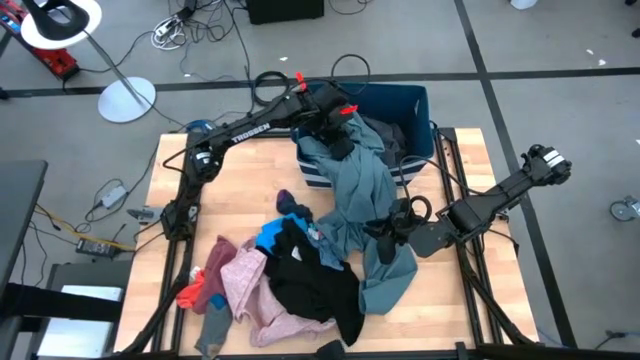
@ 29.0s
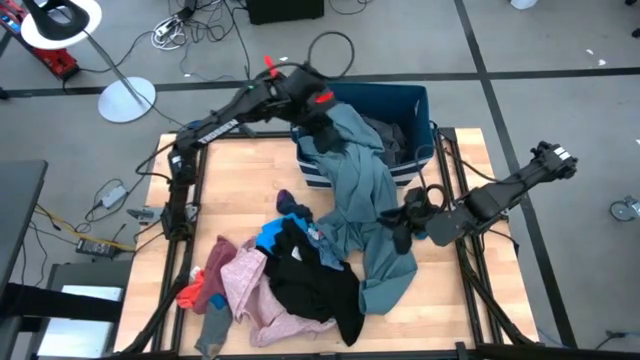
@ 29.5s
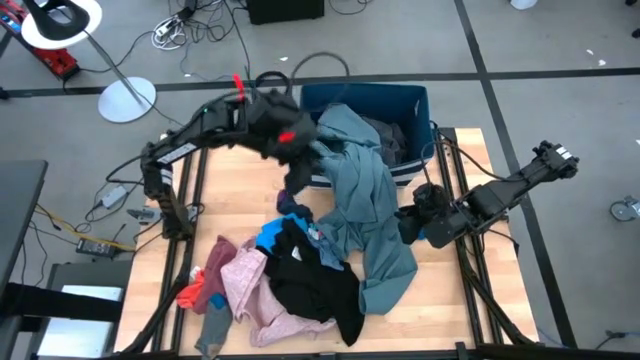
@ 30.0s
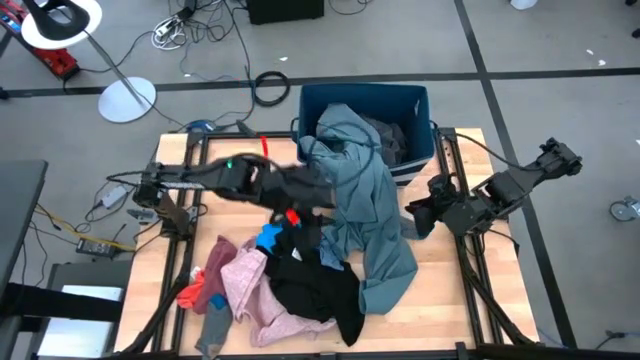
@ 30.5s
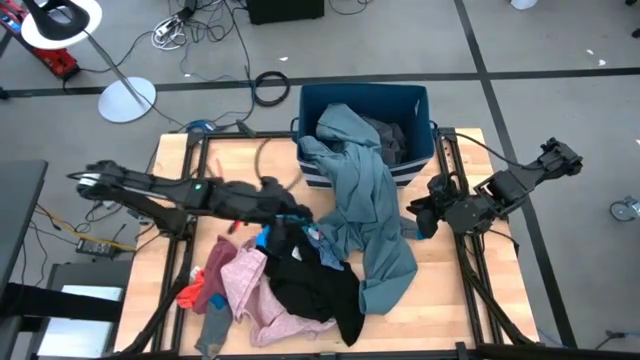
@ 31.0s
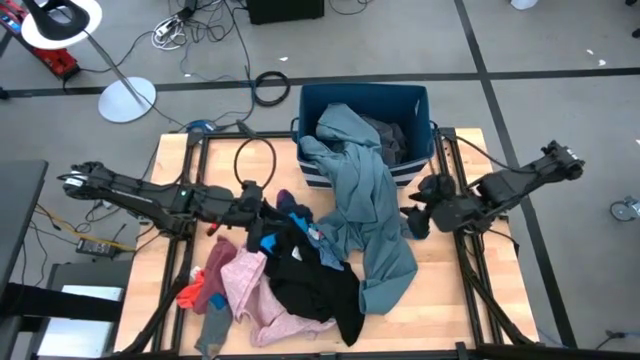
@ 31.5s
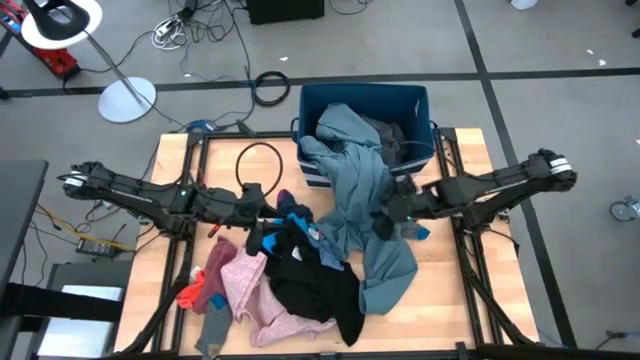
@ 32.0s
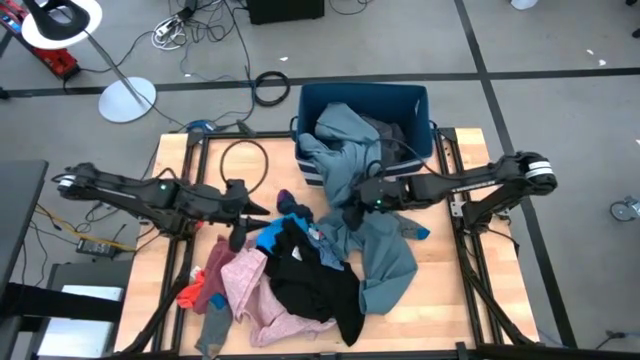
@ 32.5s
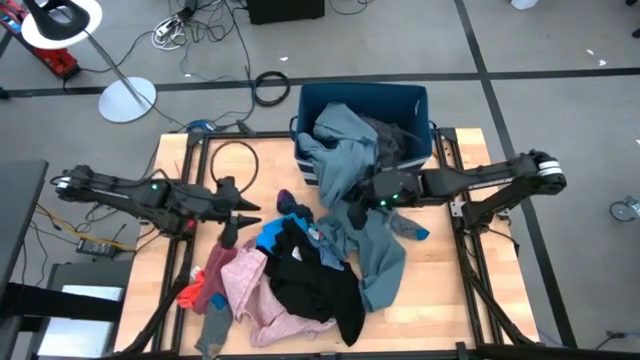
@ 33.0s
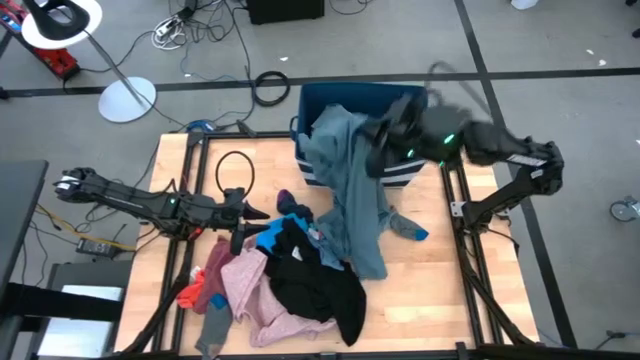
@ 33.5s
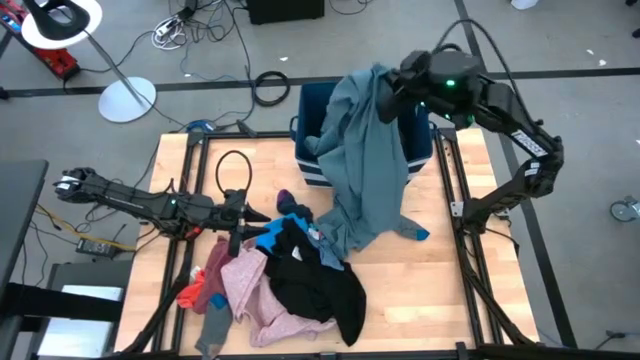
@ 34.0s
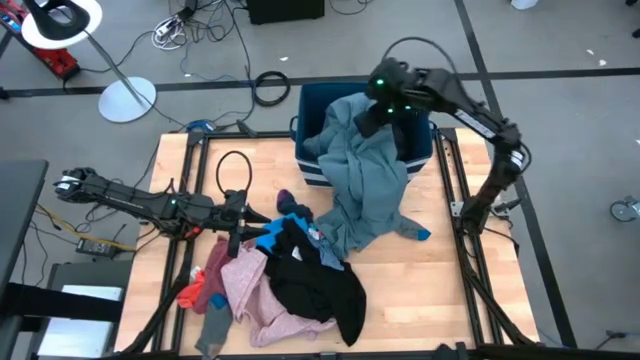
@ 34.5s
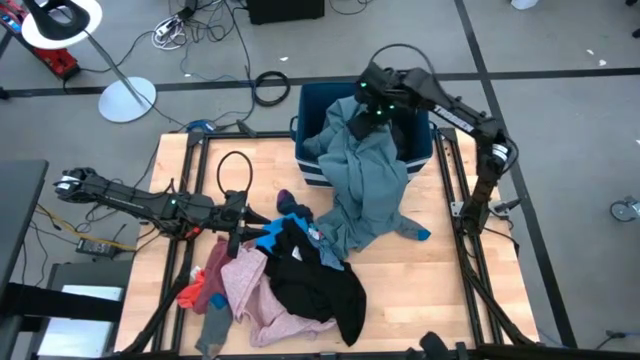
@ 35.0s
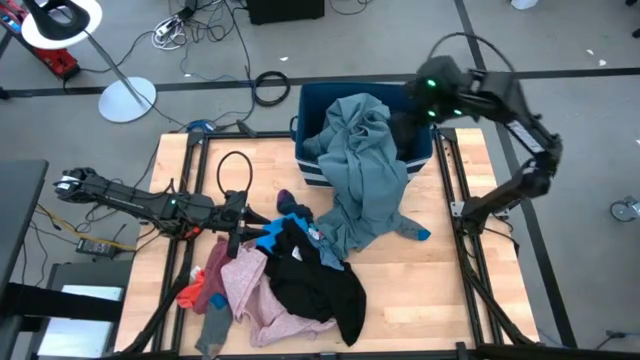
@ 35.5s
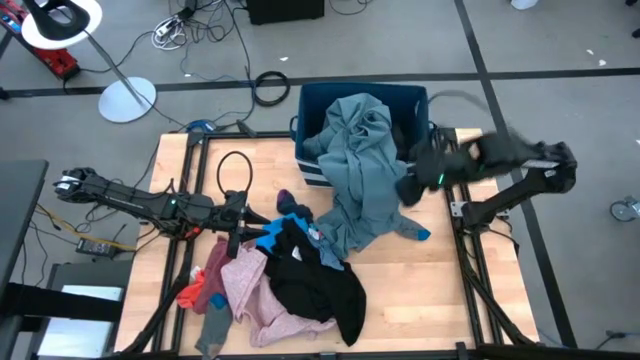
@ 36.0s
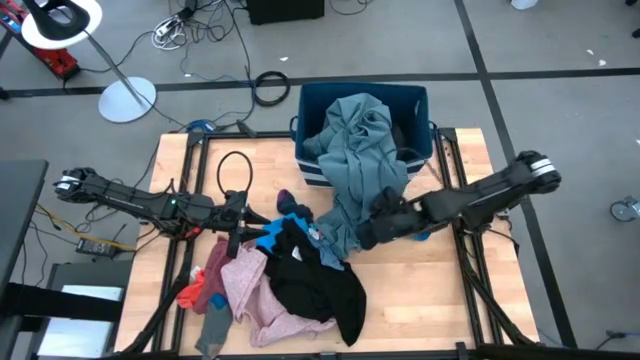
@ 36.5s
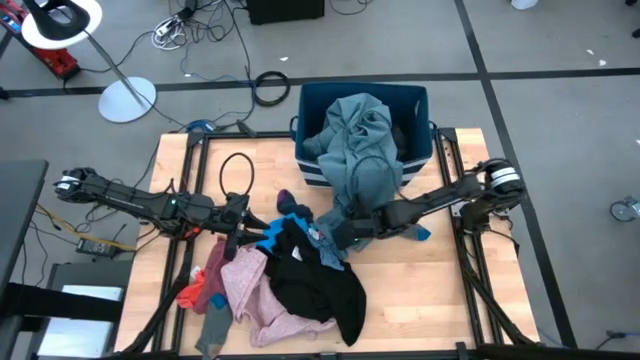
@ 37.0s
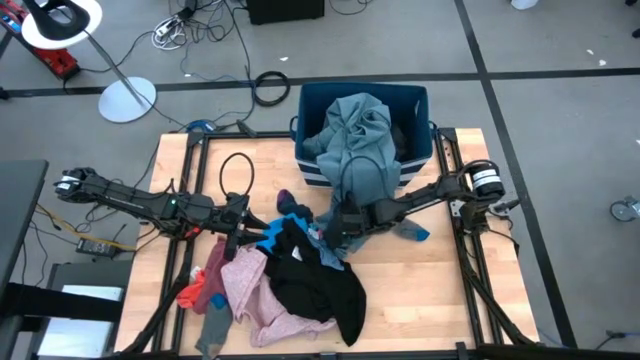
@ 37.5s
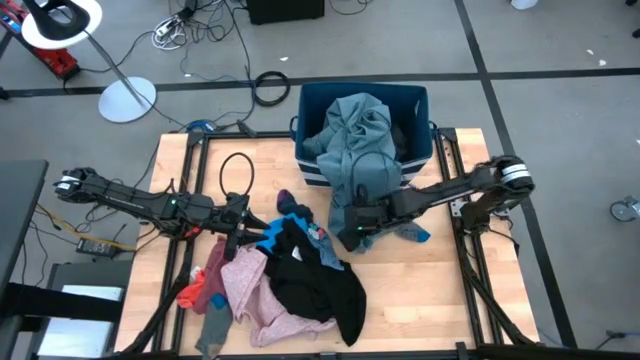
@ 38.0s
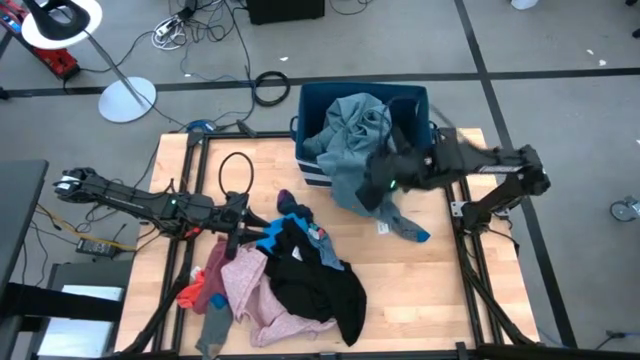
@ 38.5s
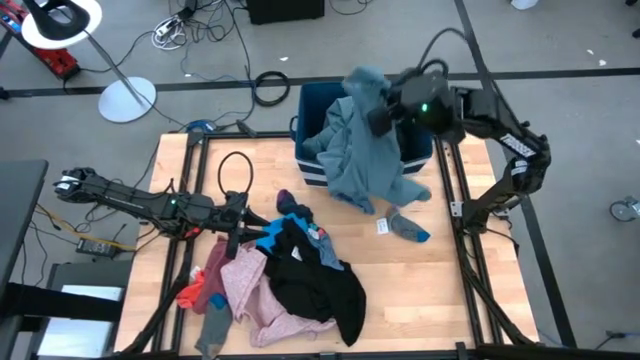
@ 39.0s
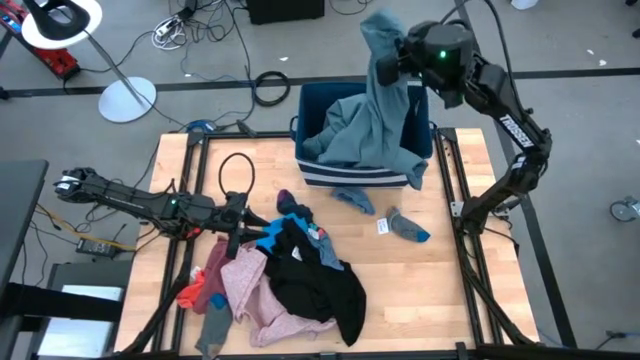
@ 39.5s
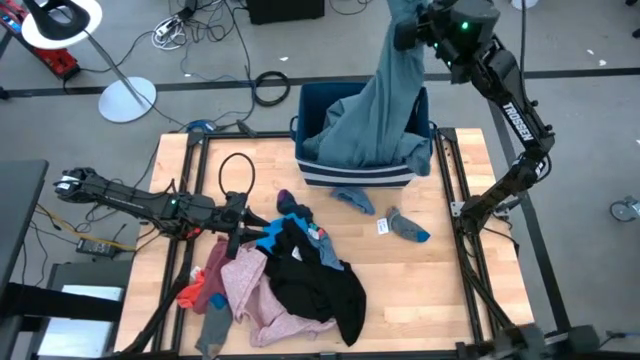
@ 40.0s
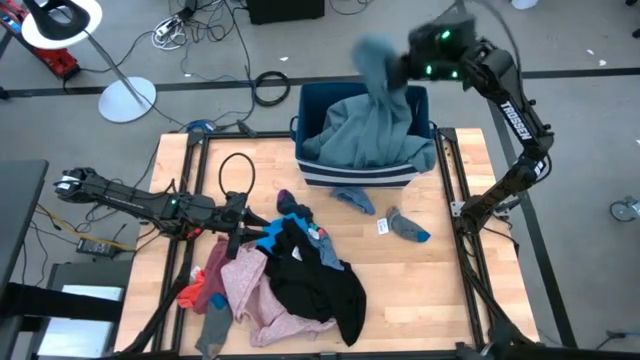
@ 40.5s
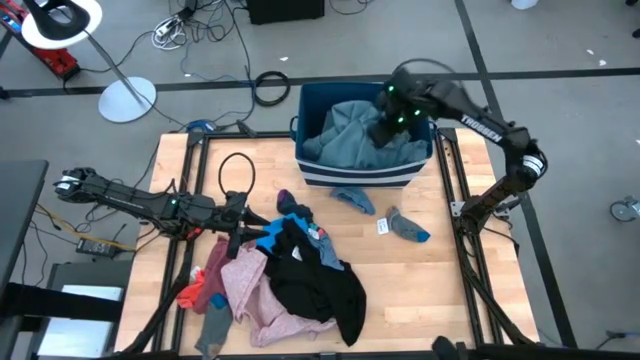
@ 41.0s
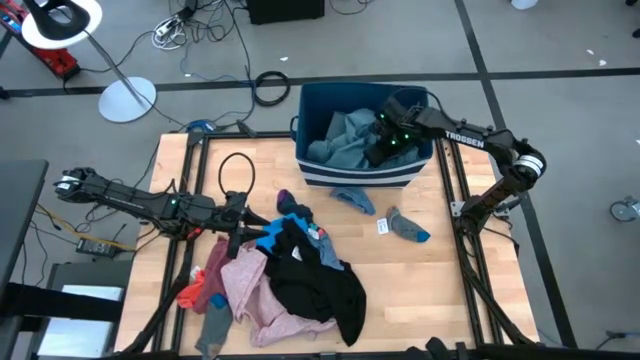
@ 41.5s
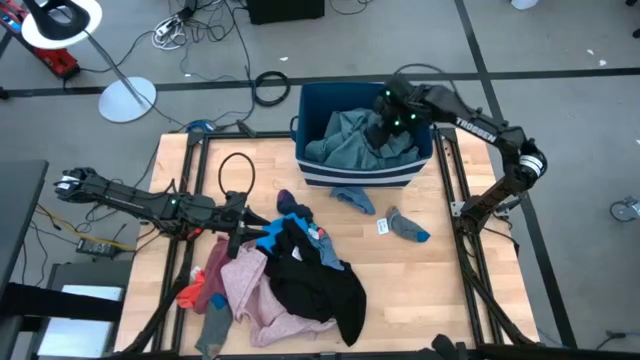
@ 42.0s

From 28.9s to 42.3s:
Task: Sort clothes
Put the gray pants into the blue bin

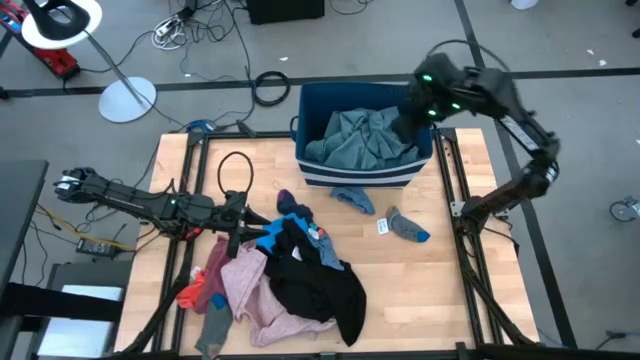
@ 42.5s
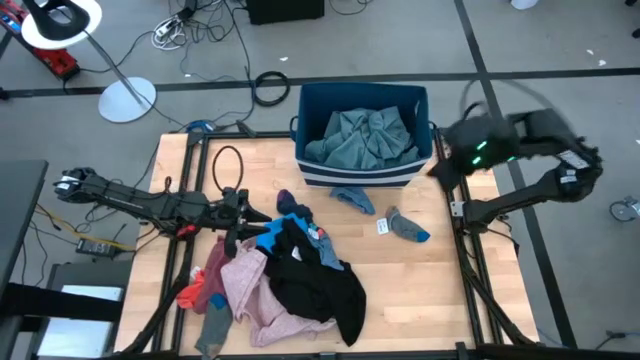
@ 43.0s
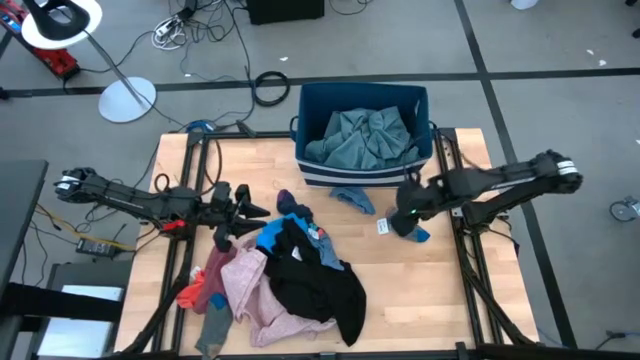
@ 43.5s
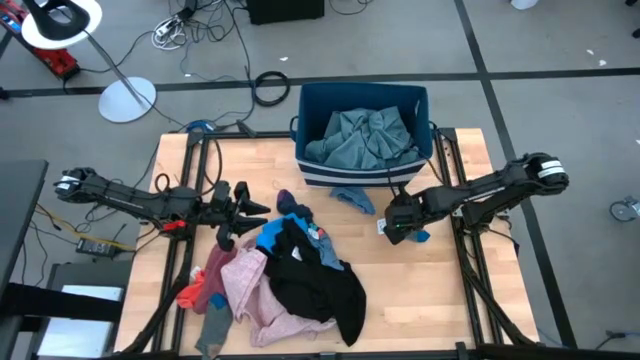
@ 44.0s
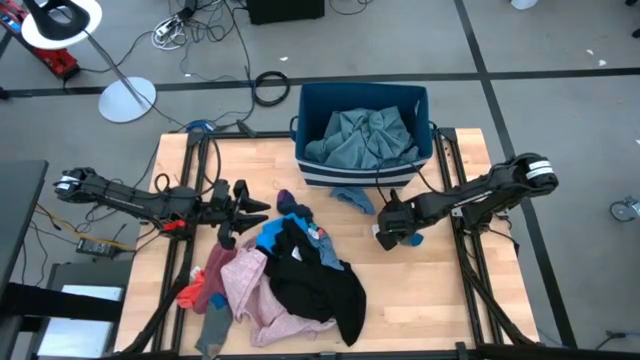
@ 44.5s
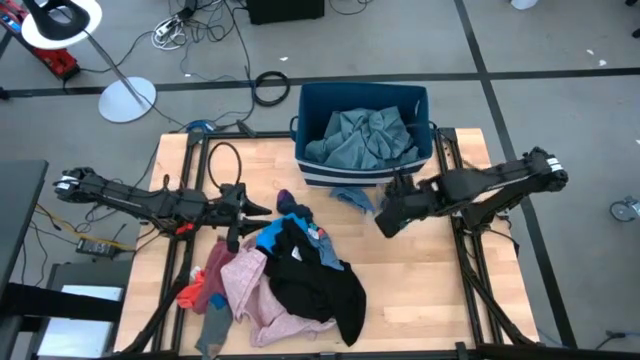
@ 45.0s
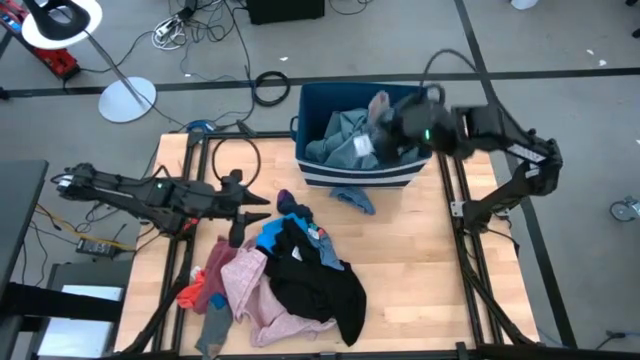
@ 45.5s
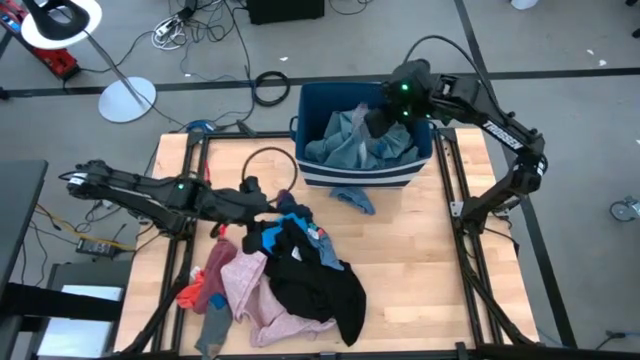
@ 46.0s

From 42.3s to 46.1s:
Put the top gray socks into the blue bin

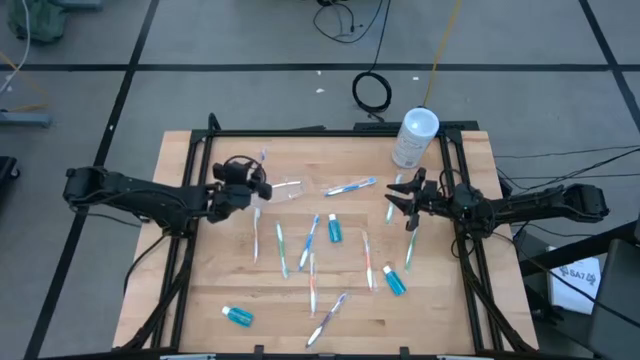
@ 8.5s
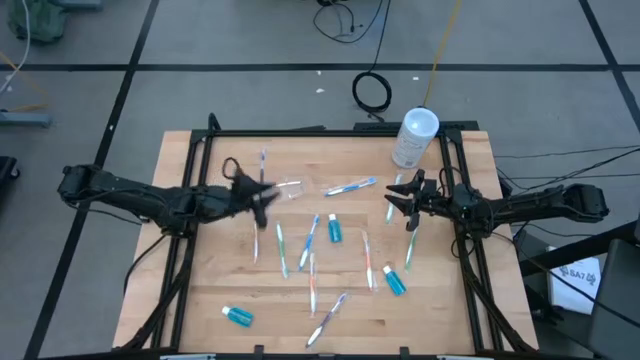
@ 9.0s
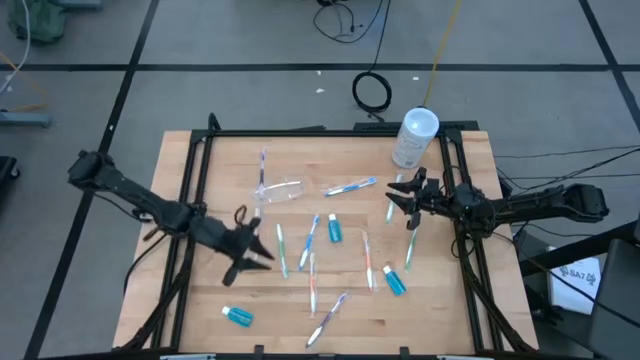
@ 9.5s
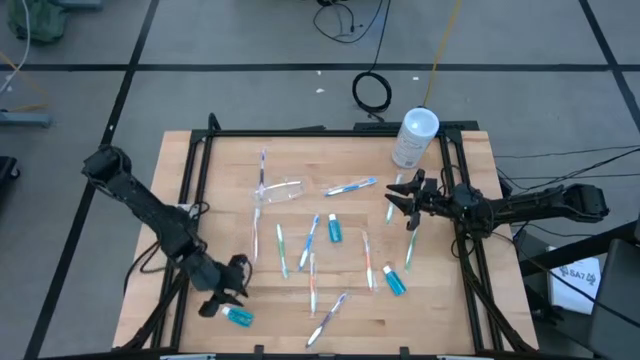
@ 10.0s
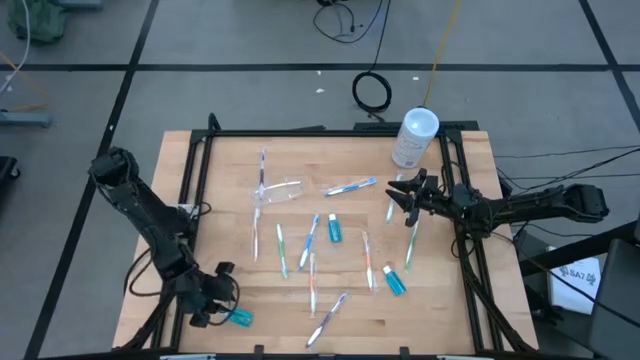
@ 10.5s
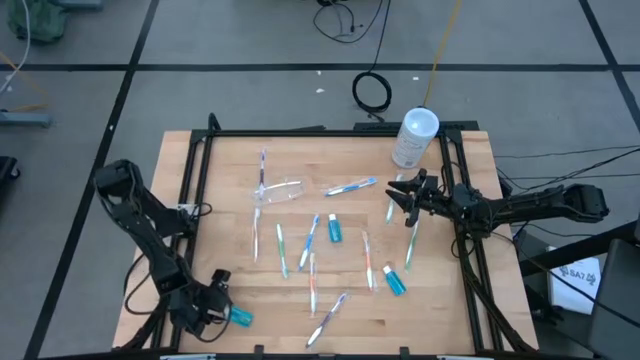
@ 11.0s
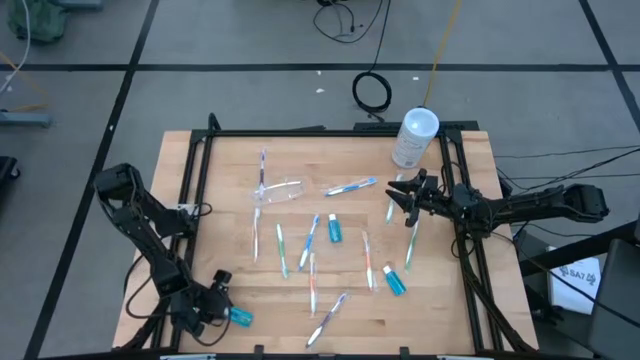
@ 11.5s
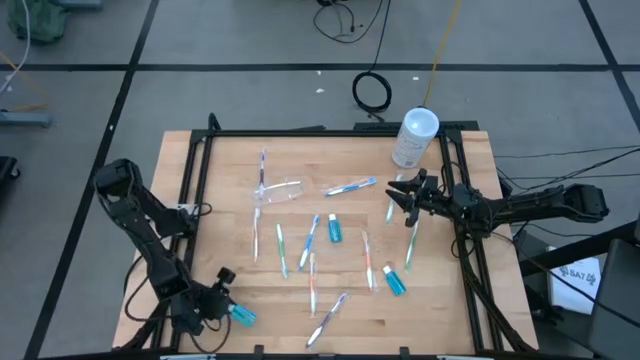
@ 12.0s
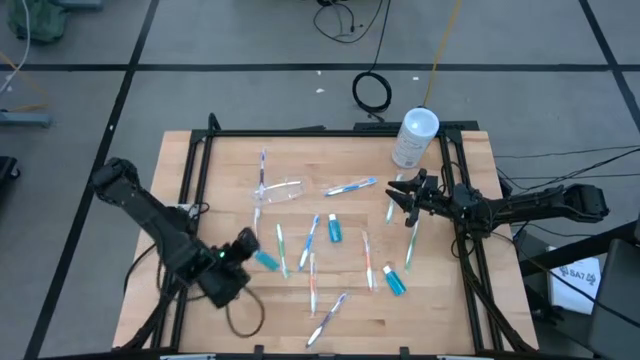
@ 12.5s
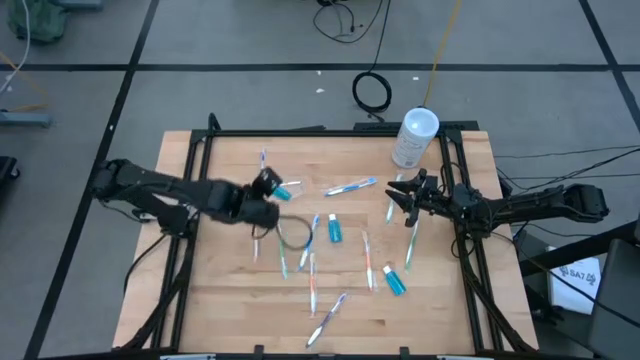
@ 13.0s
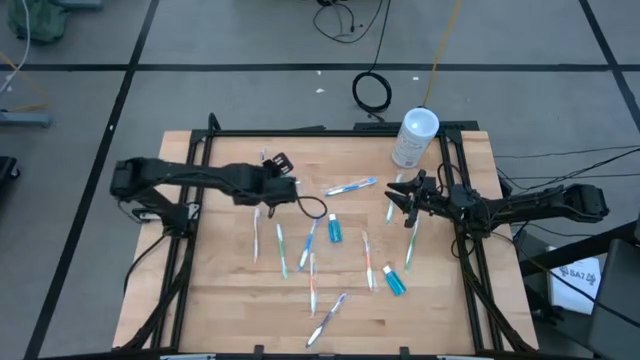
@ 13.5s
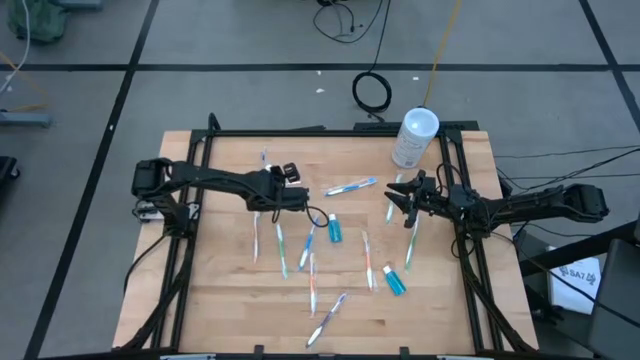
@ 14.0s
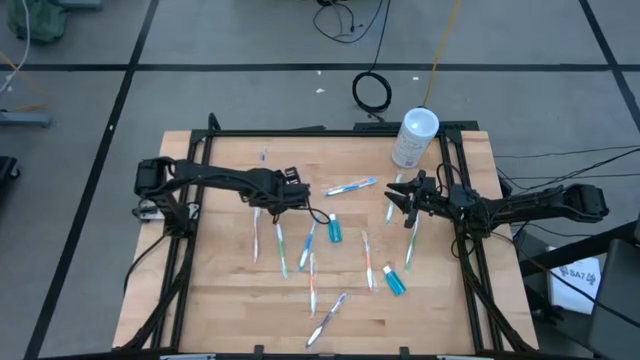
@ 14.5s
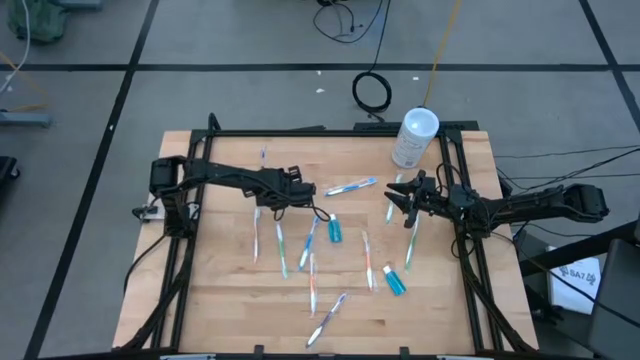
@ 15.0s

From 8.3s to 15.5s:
Task: Pick & Place toothbrushing station
Put the bottom blue mouthwash into the middle compartment of the transparent organizer
